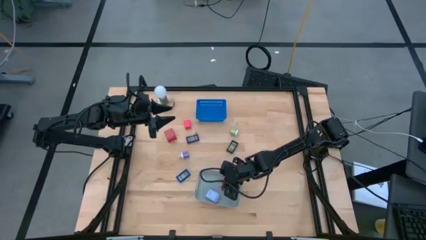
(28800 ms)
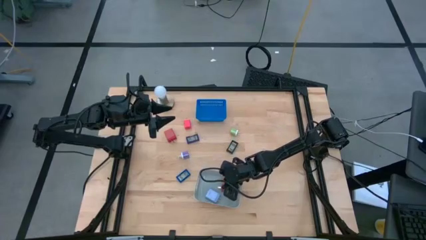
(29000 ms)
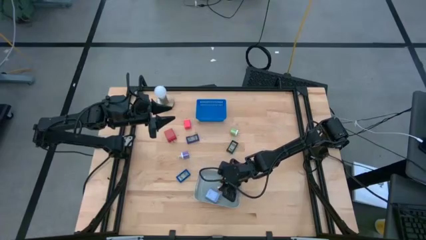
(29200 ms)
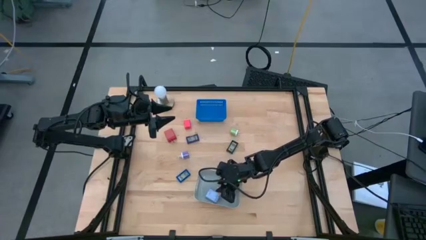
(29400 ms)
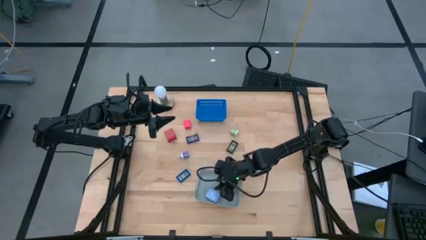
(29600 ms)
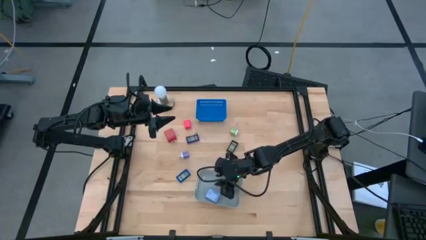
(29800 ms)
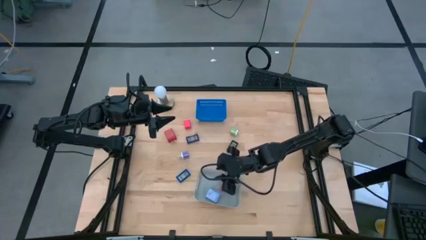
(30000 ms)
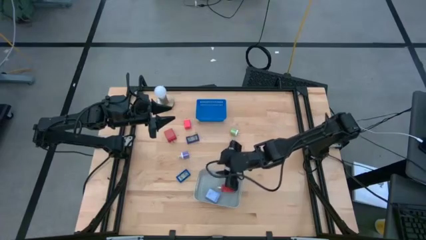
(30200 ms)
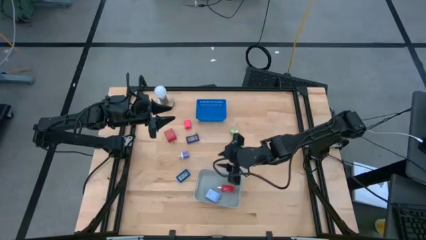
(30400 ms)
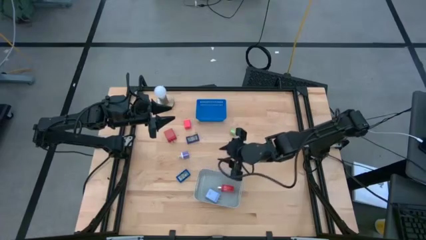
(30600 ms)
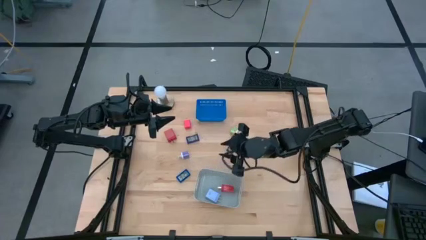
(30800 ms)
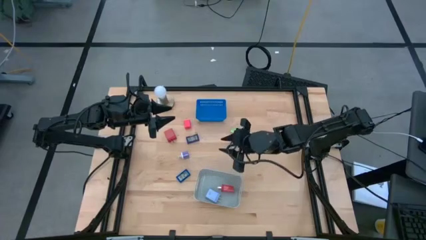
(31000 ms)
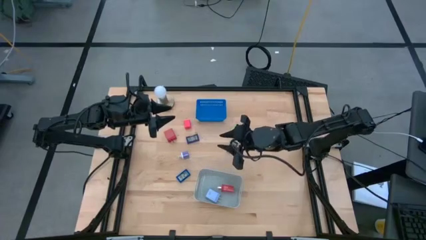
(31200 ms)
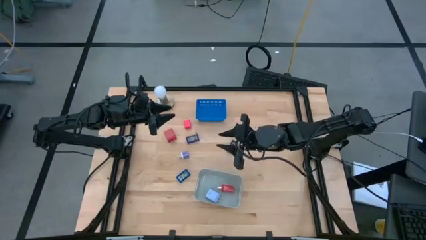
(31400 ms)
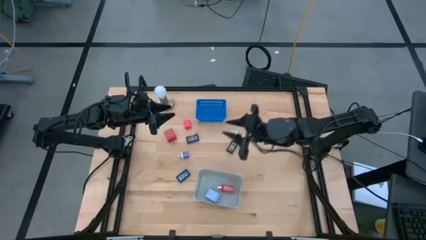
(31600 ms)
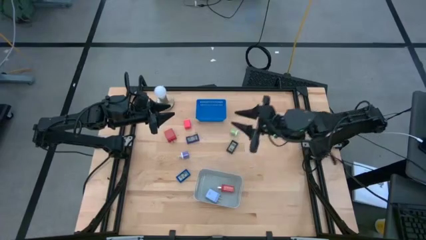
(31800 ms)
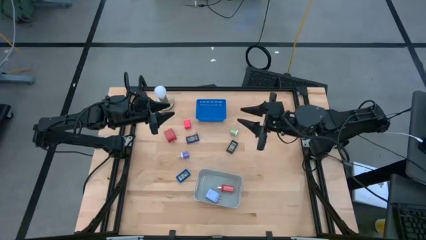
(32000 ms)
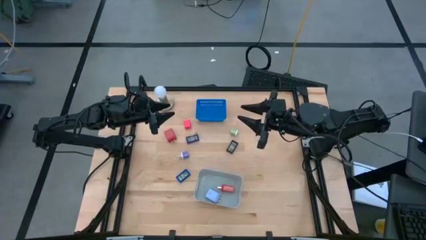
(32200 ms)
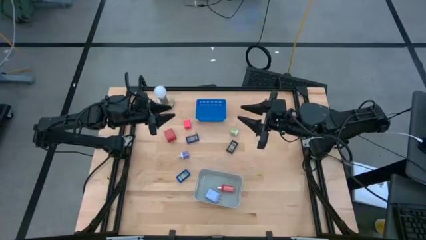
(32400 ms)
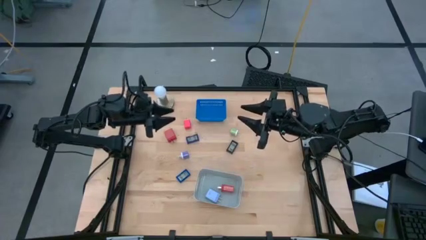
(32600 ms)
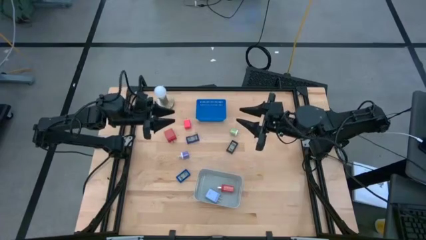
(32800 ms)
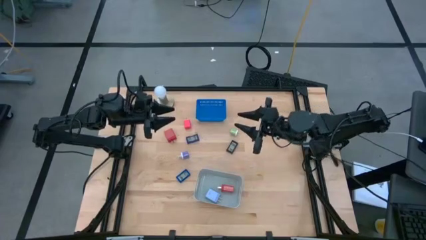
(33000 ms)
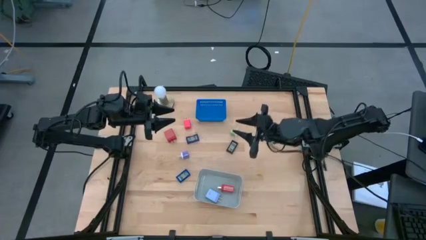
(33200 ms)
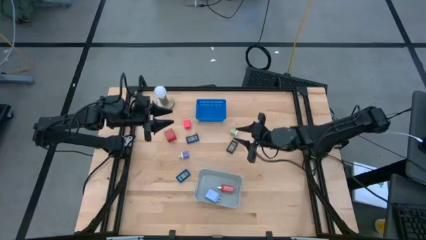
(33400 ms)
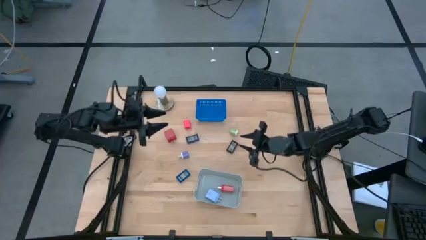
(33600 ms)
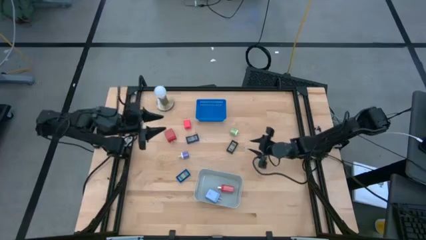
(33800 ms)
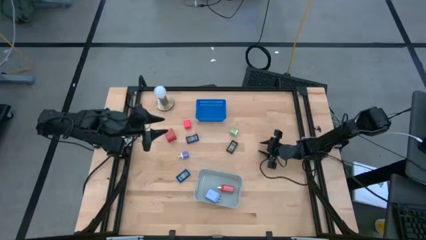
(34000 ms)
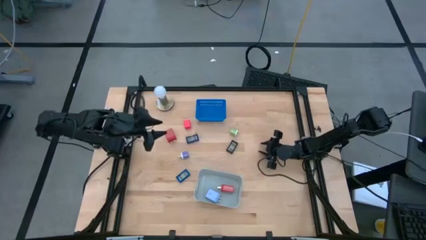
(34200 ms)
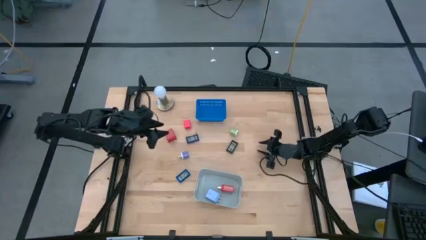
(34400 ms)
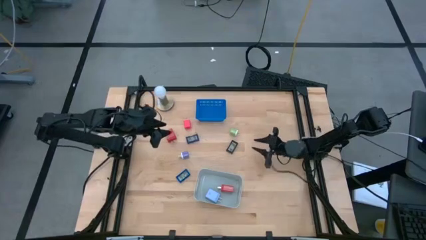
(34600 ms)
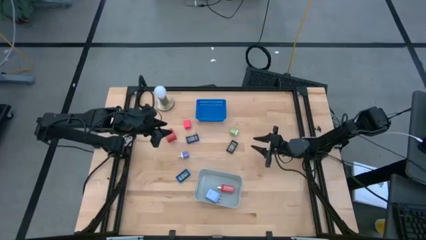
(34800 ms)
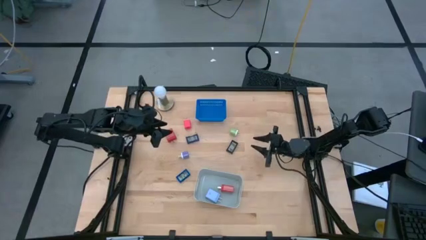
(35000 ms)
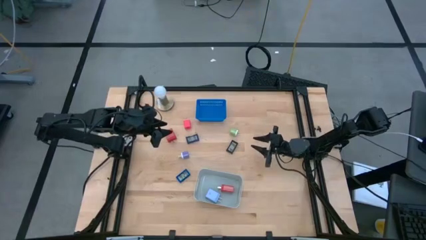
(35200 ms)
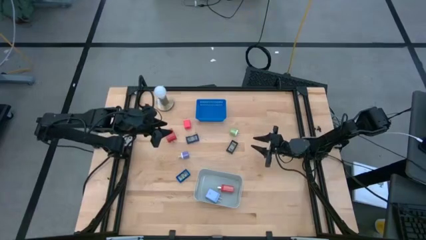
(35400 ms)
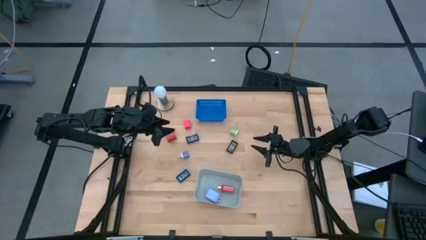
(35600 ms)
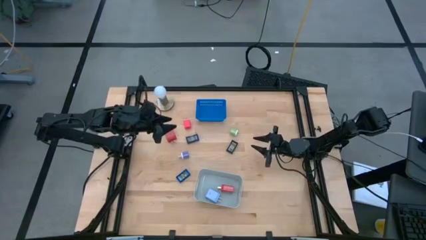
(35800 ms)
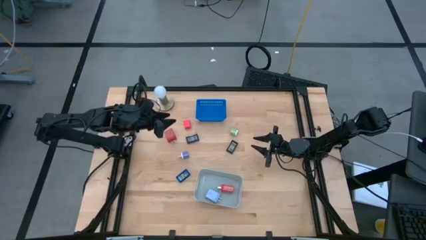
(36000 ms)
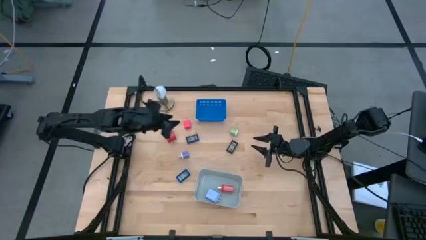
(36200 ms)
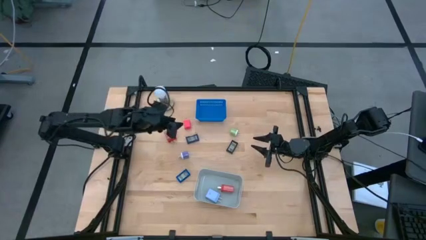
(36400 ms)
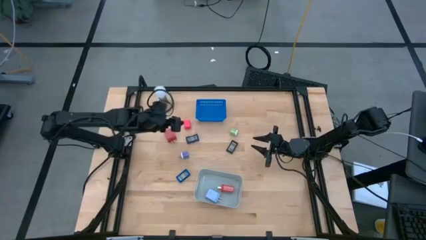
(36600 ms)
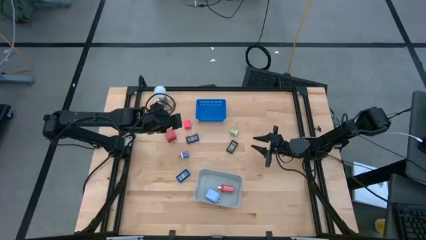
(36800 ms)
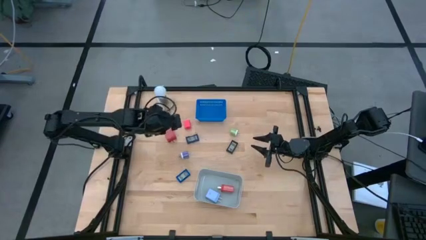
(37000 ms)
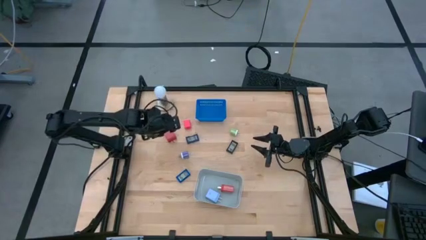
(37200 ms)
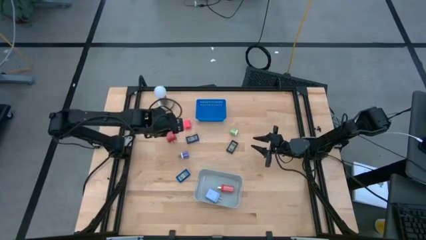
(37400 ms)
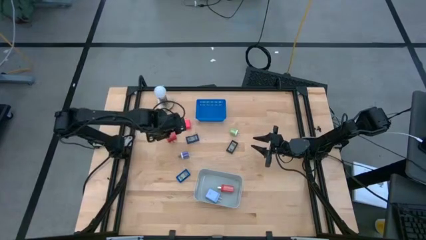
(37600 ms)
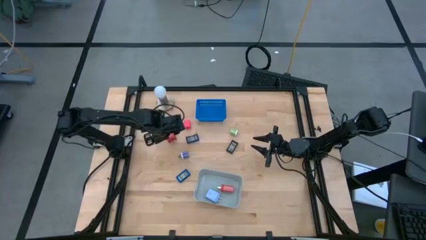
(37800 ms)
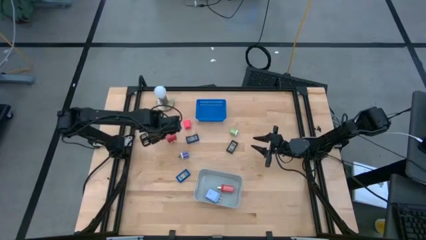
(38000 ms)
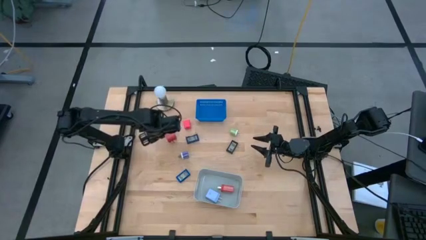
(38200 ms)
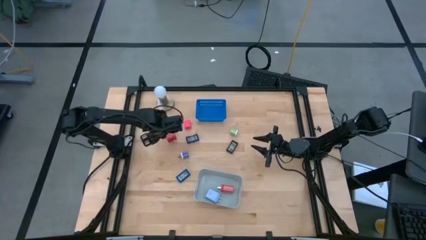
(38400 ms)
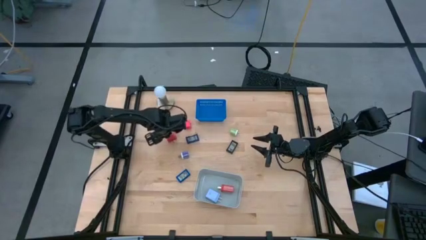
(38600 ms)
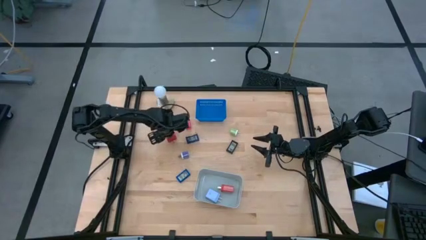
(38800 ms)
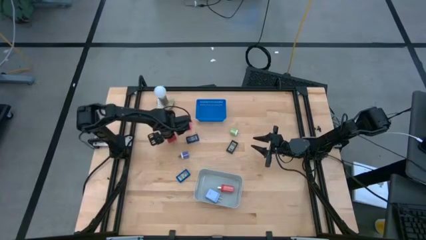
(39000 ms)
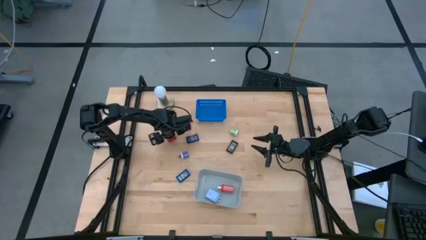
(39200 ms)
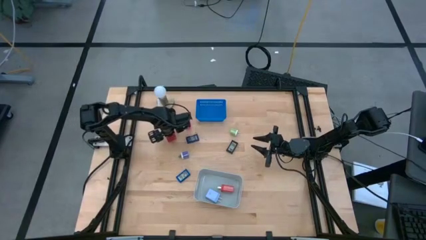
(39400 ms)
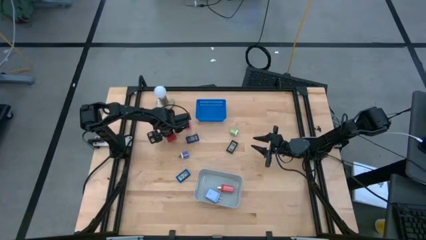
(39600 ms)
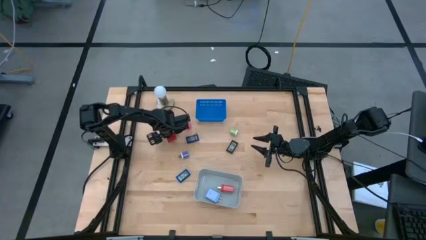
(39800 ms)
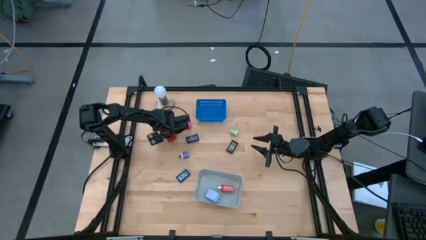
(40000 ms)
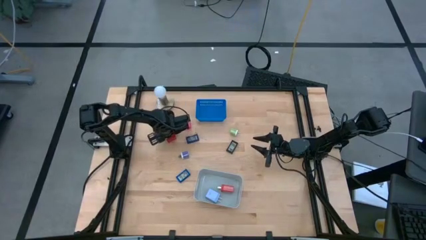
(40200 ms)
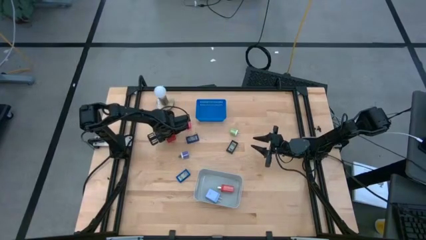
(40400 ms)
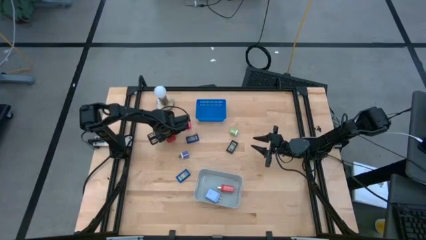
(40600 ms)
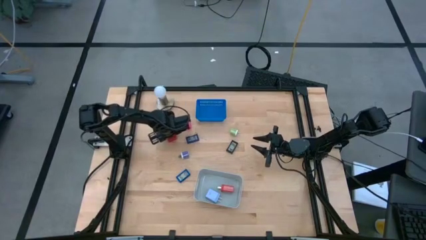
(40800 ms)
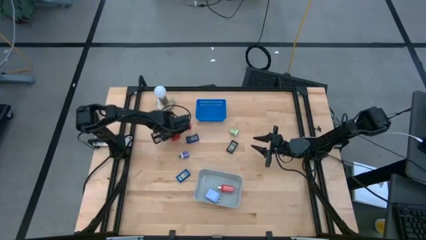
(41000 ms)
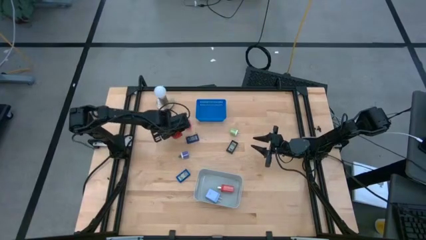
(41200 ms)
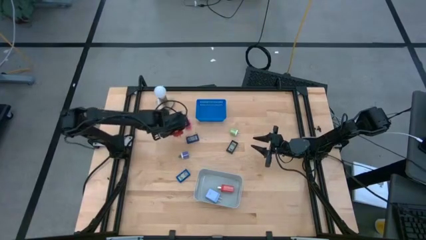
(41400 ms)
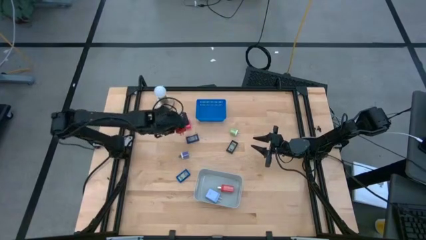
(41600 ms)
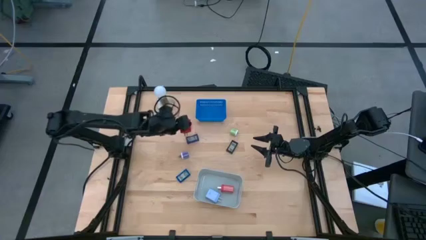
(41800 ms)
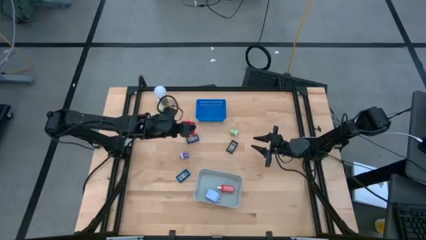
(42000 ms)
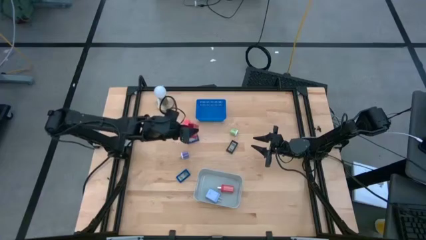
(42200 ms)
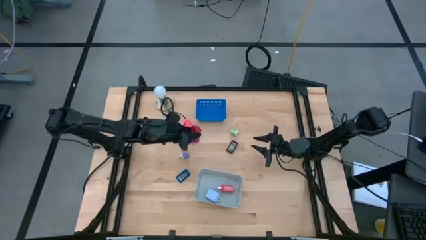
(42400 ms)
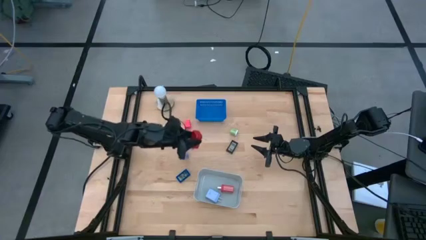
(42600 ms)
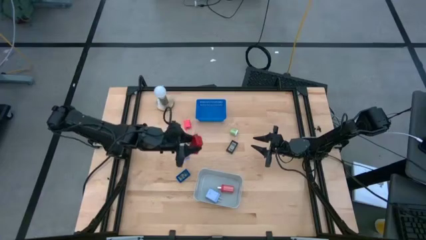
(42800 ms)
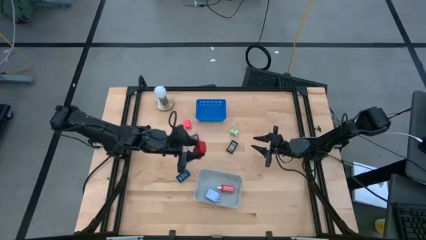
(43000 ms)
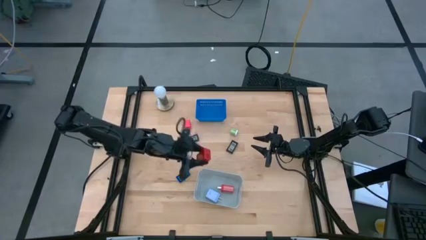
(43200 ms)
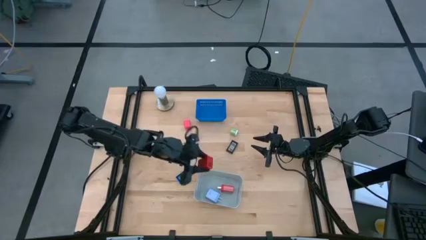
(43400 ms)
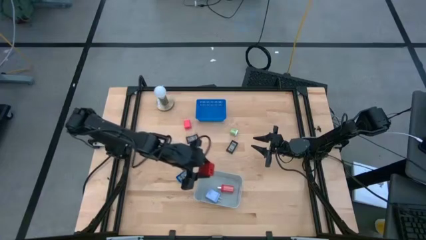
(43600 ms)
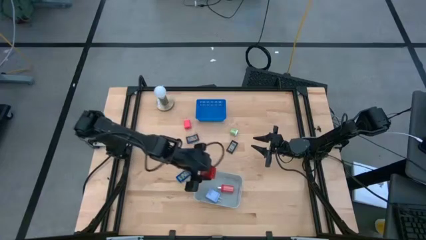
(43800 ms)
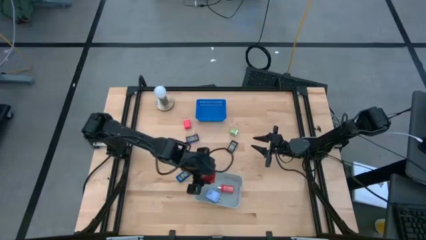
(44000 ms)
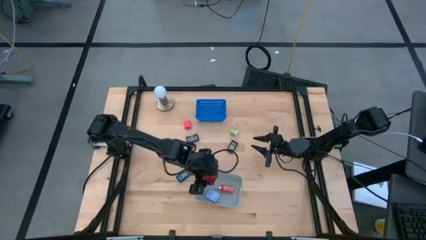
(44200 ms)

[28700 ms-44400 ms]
Task: Pick & Place Office items
Put the red charger adapter into the gray bin
